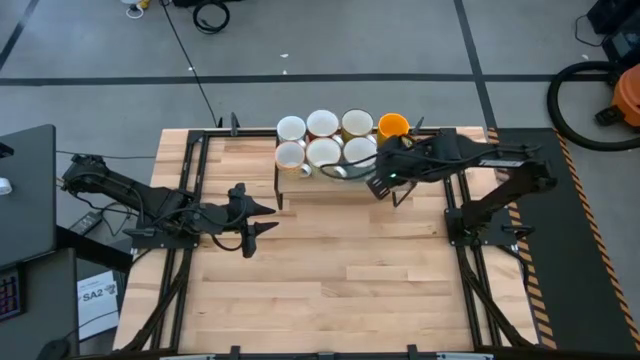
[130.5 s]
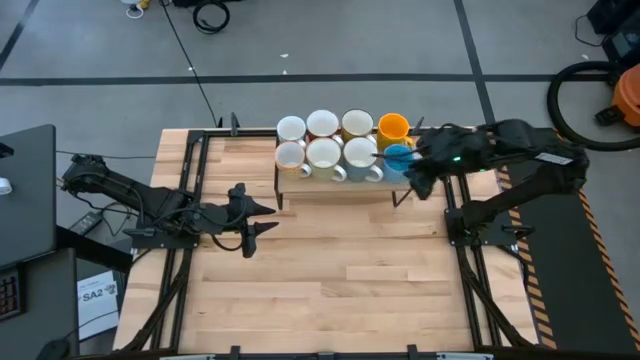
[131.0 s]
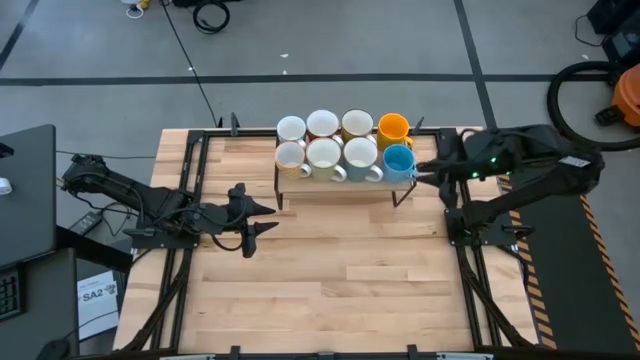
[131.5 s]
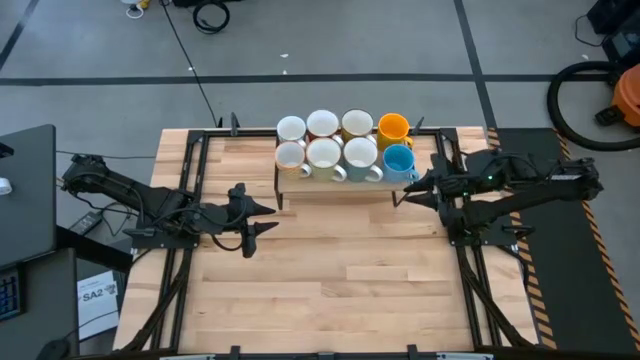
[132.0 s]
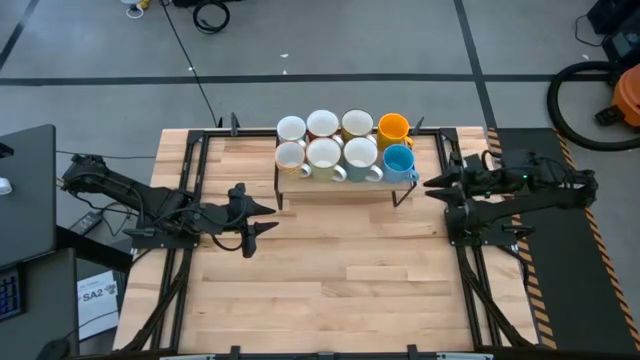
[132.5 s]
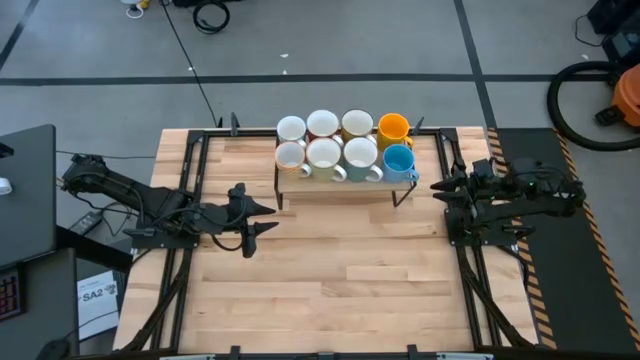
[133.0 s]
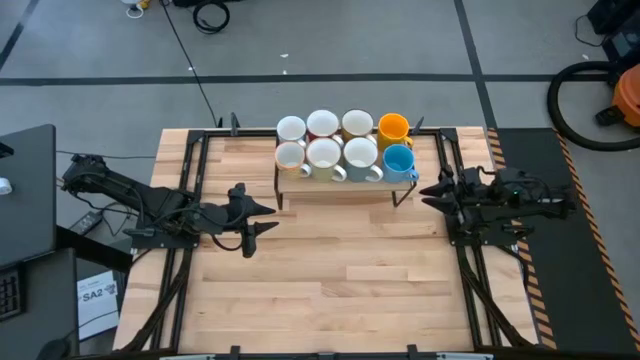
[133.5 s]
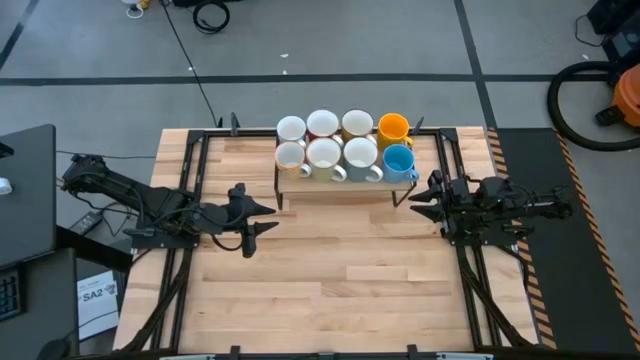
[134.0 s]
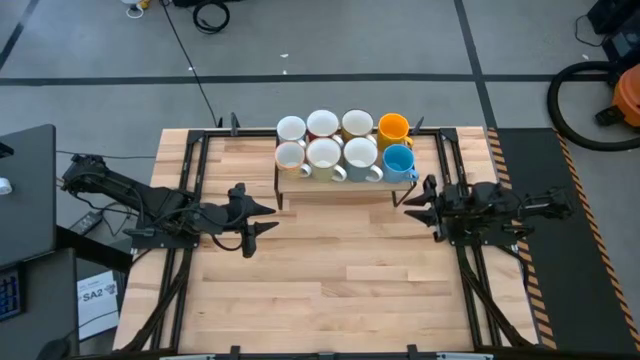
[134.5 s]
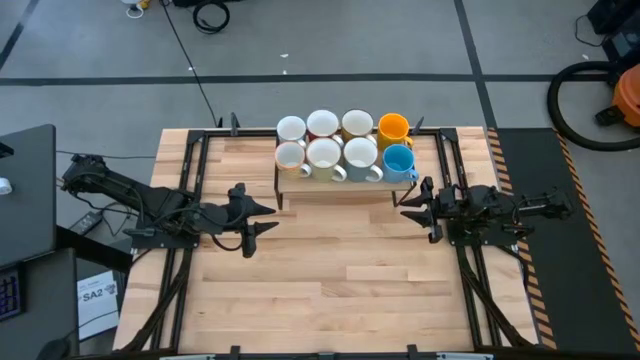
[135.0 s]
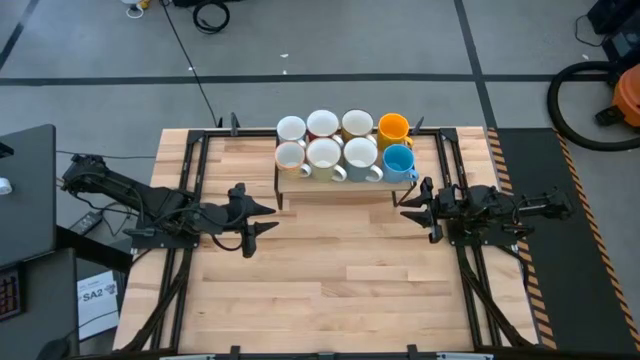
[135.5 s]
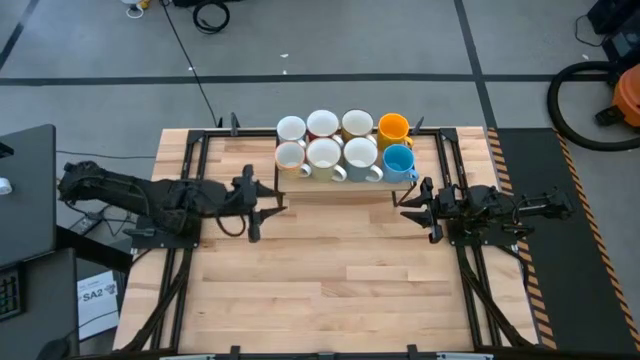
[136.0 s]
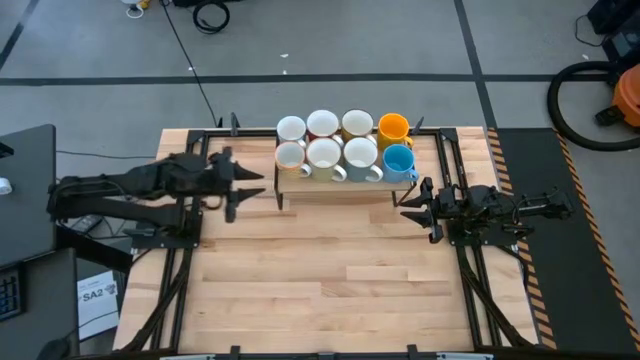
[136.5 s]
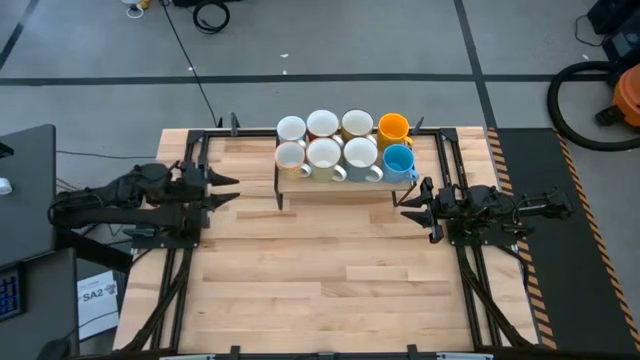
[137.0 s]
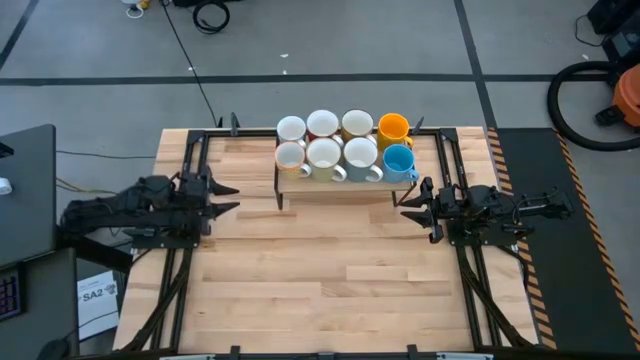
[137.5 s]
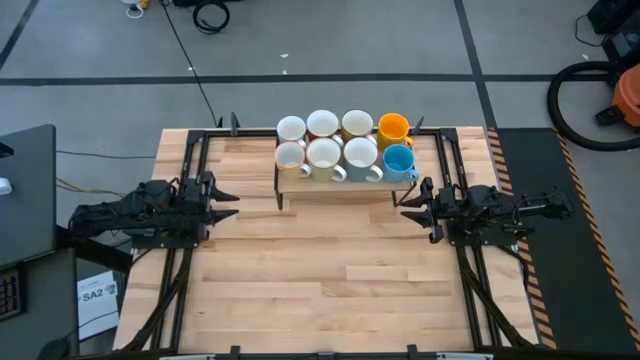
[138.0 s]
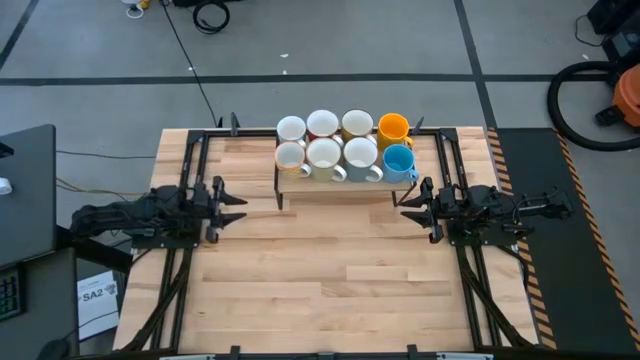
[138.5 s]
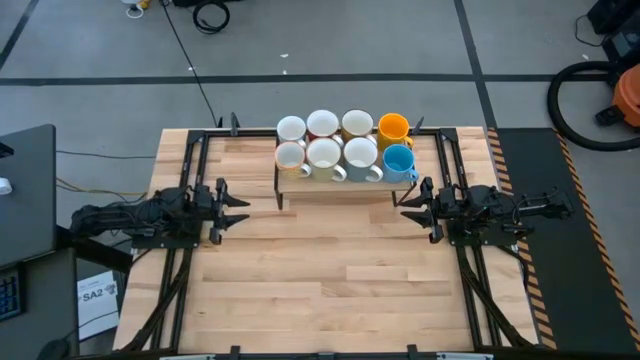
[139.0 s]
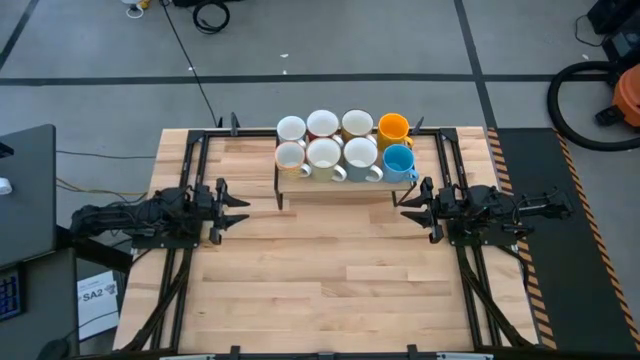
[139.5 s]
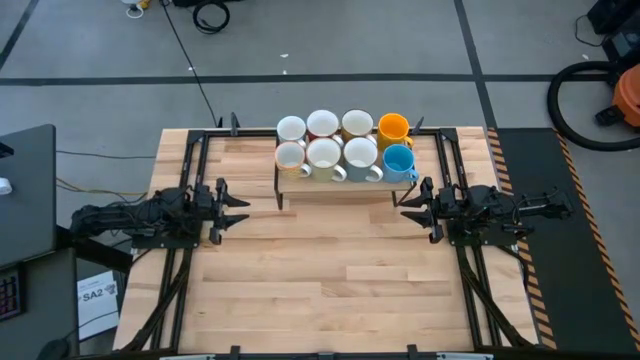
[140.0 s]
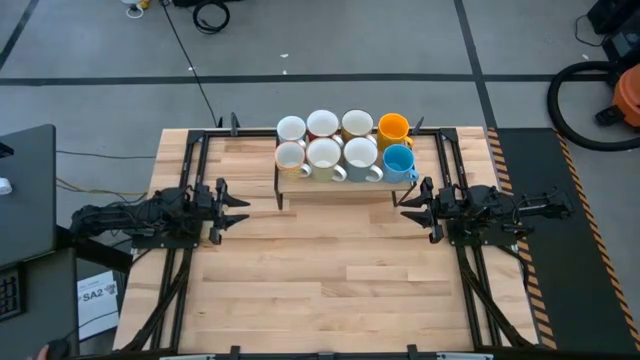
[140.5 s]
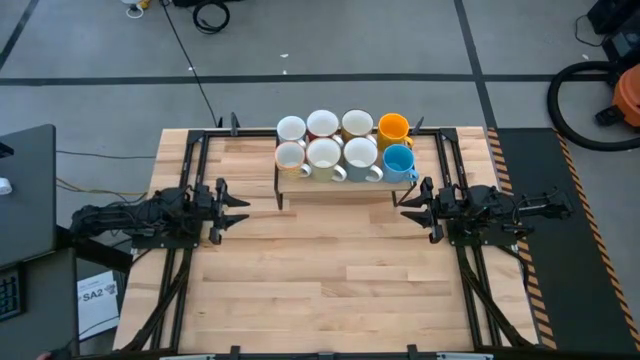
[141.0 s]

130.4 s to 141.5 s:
Task: Place coffee mugs
Return to Home Position

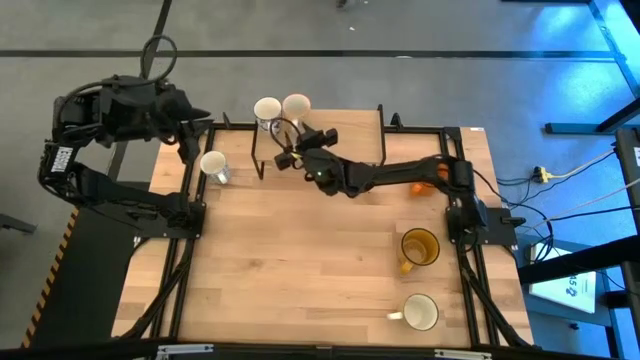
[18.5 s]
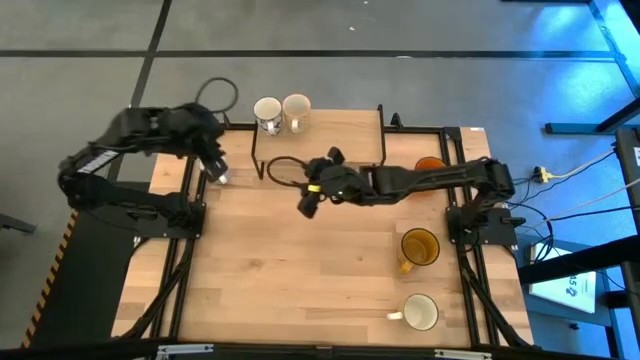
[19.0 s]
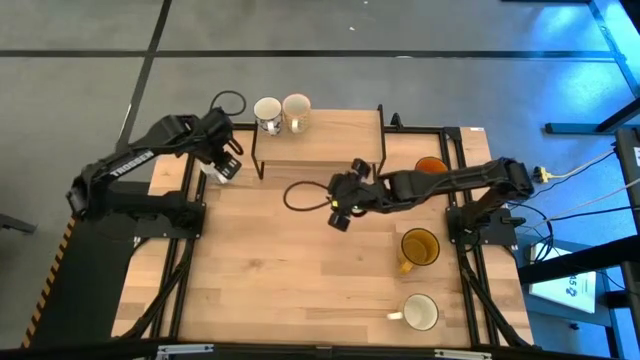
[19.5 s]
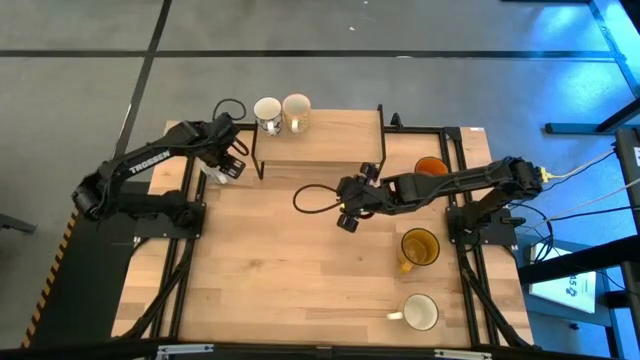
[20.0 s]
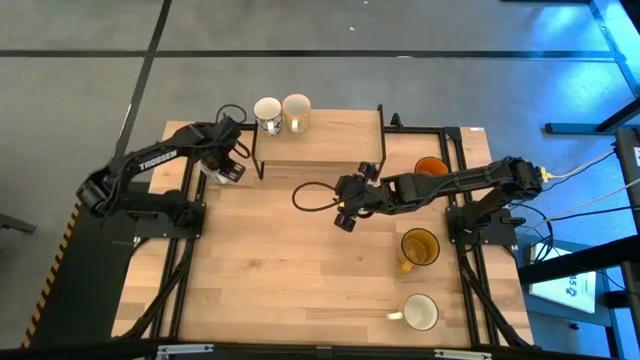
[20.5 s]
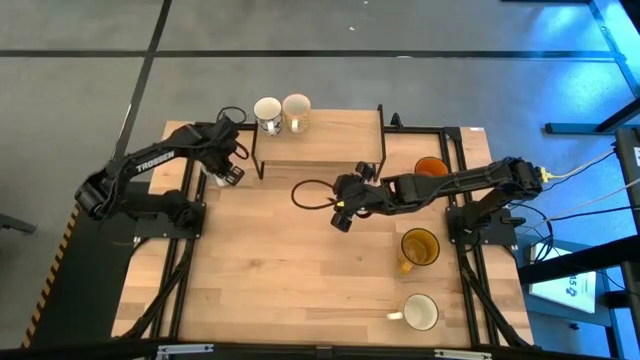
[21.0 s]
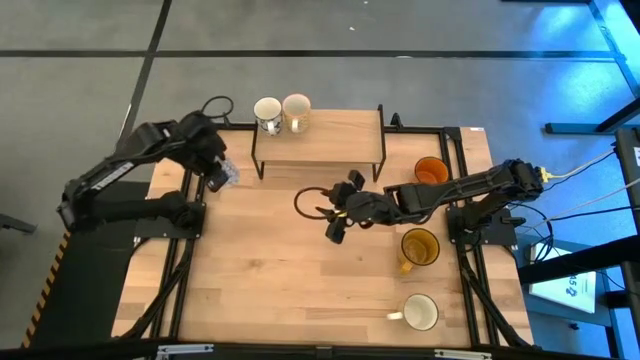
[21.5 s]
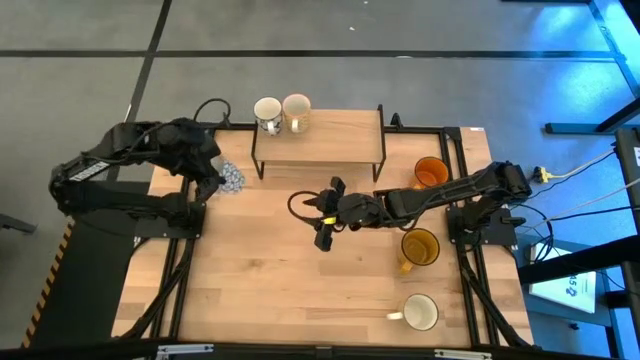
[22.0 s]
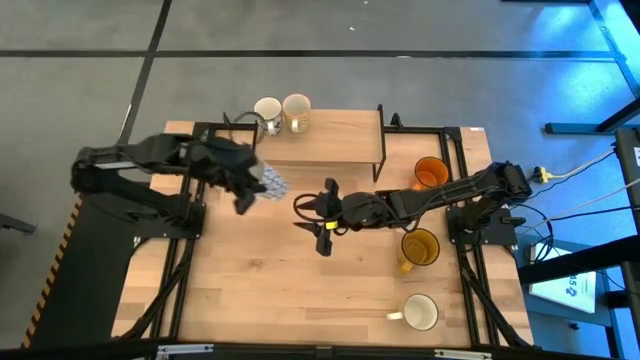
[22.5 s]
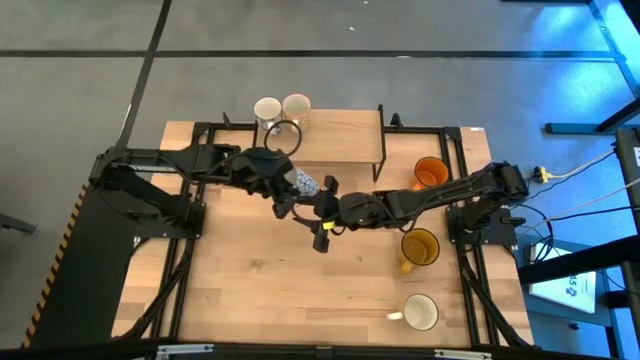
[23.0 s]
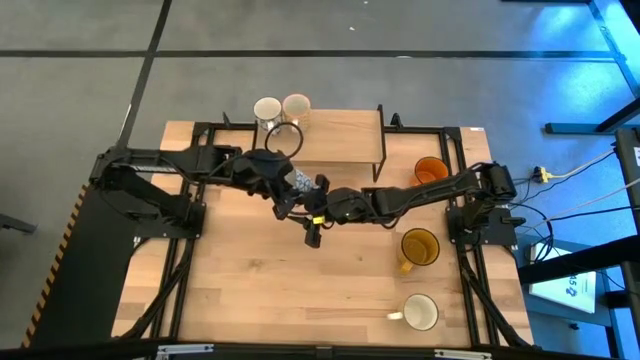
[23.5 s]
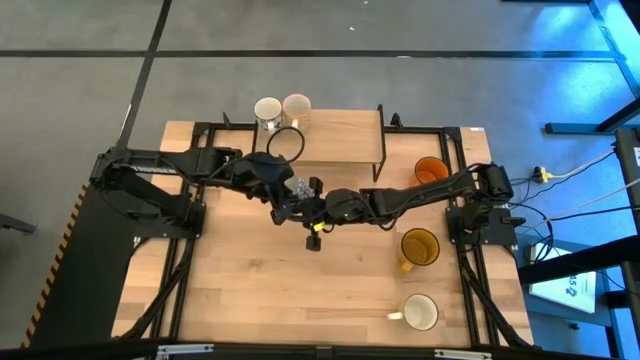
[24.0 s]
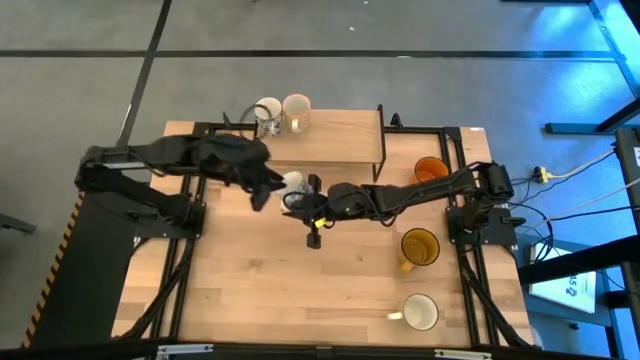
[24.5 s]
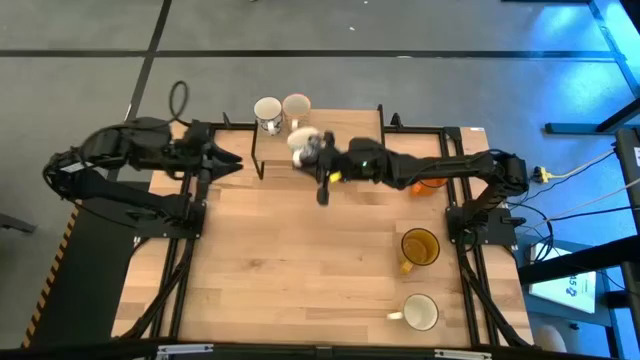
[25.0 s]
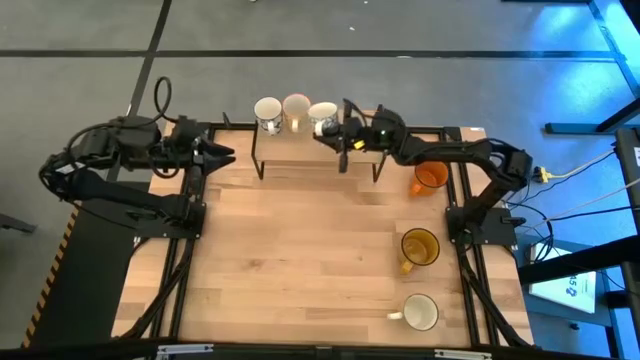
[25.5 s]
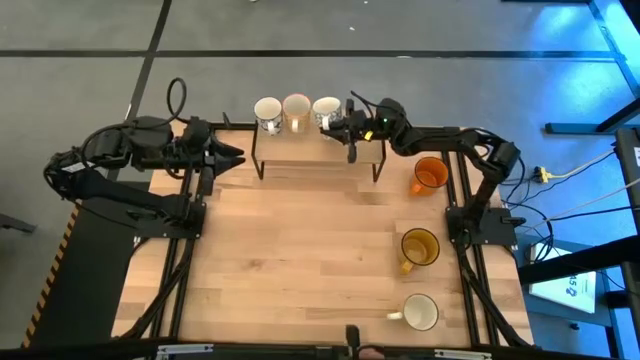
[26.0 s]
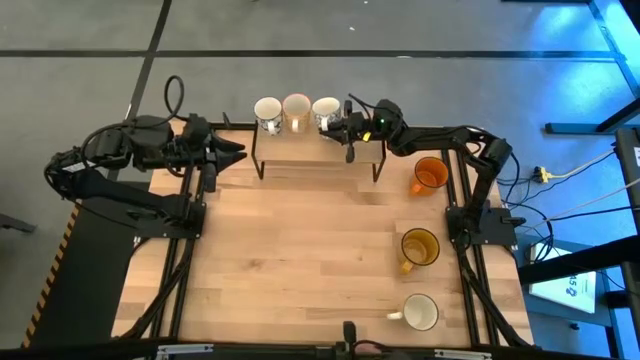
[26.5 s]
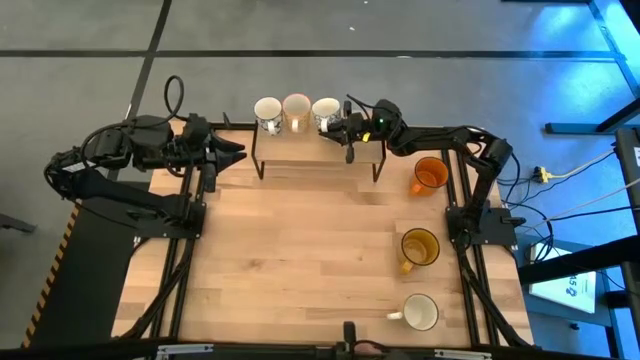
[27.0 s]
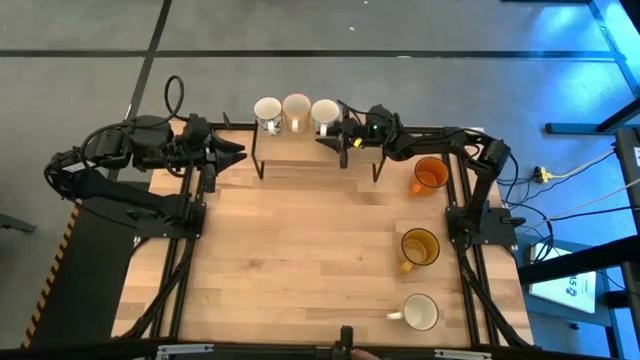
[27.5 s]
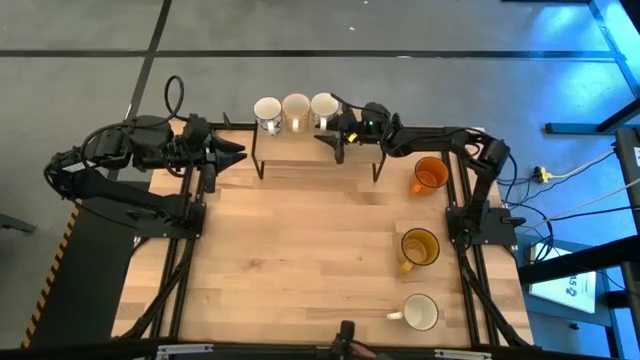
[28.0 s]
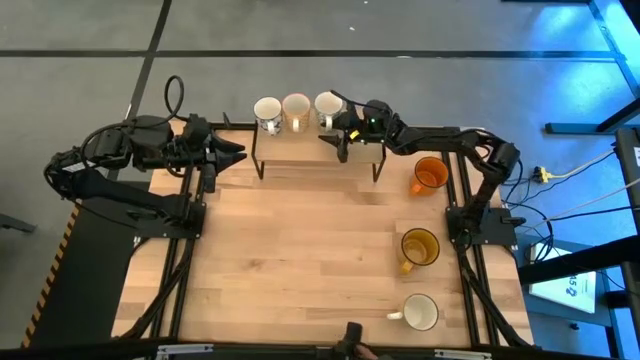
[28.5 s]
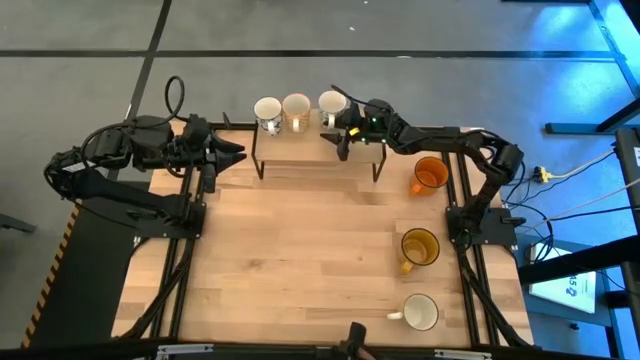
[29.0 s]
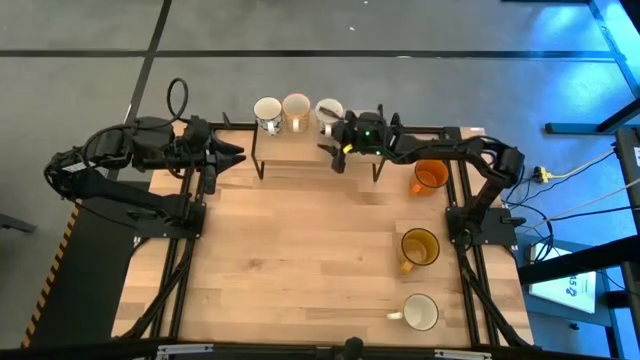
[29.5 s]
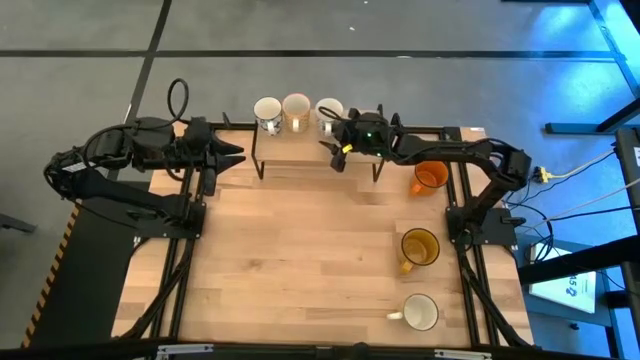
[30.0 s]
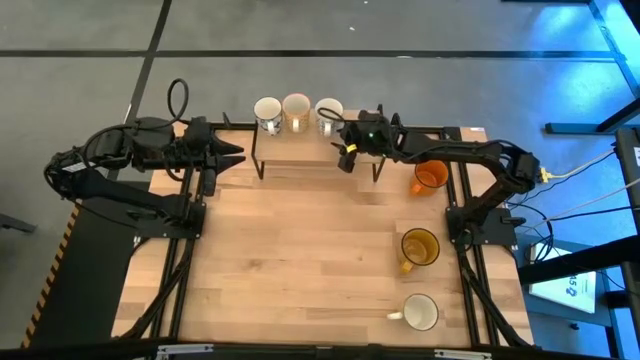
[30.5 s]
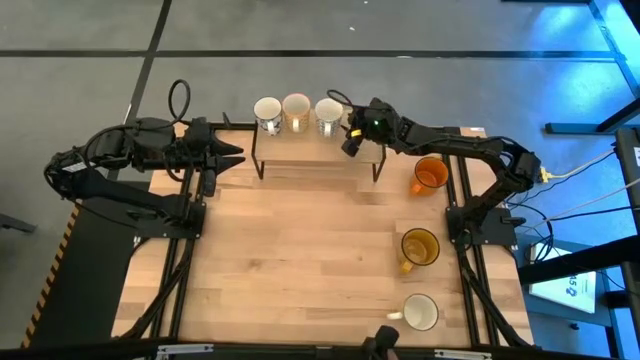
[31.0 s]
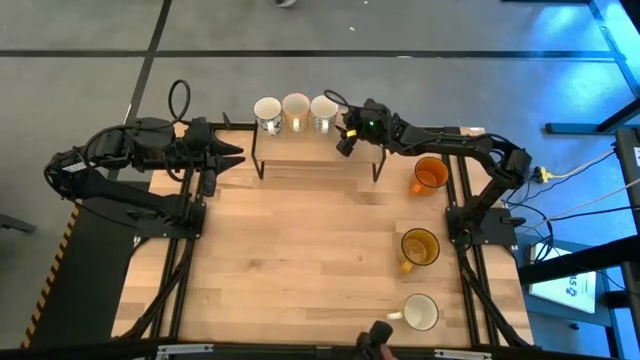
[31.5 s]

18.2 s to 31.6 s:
Task: Place coffee mugs
Put the light blue patterned mug on the shelf
